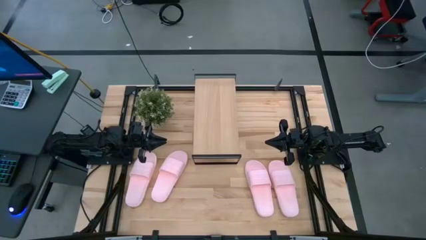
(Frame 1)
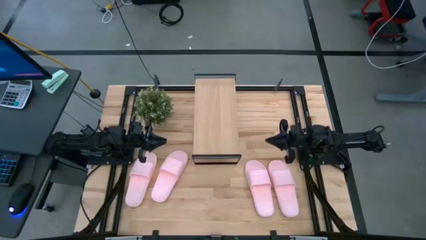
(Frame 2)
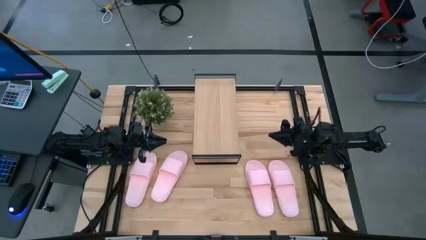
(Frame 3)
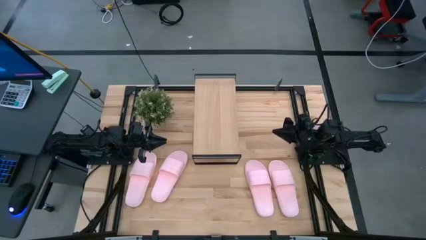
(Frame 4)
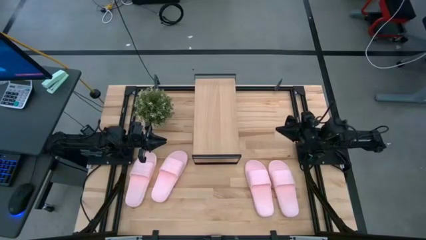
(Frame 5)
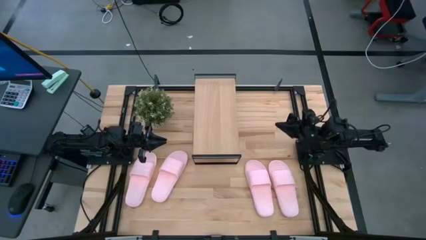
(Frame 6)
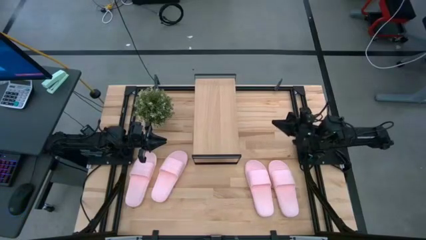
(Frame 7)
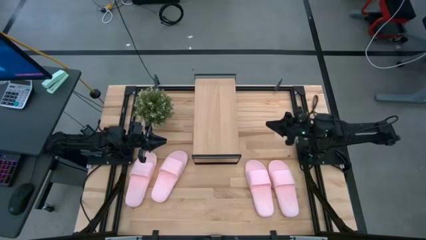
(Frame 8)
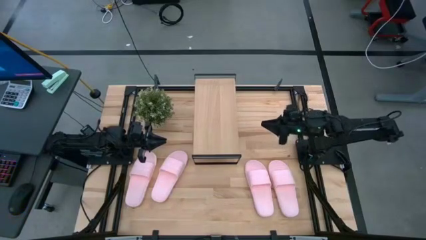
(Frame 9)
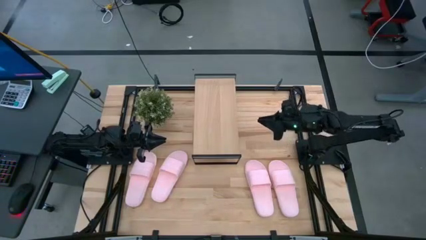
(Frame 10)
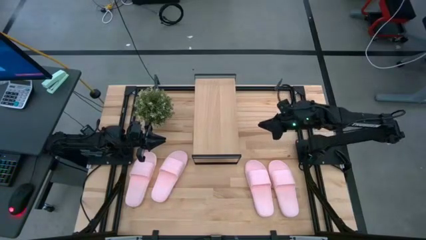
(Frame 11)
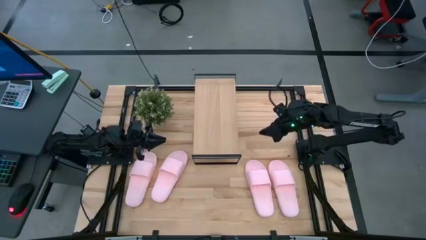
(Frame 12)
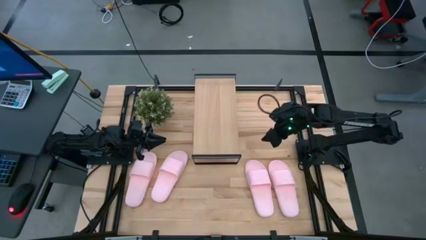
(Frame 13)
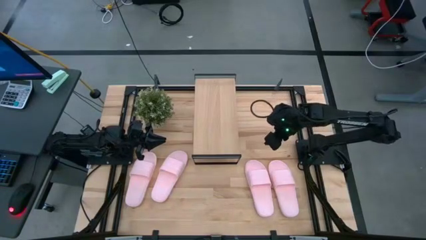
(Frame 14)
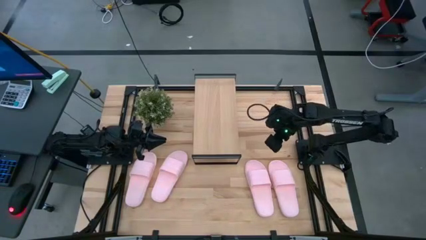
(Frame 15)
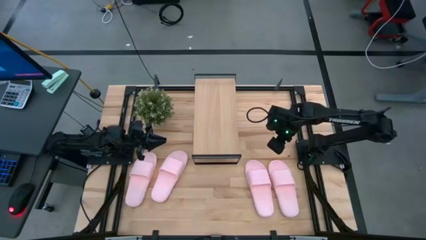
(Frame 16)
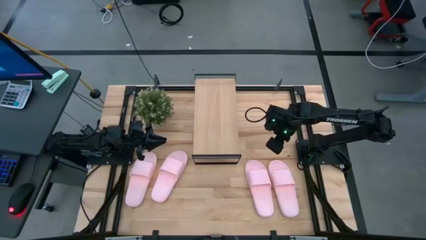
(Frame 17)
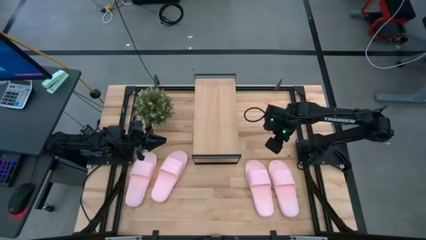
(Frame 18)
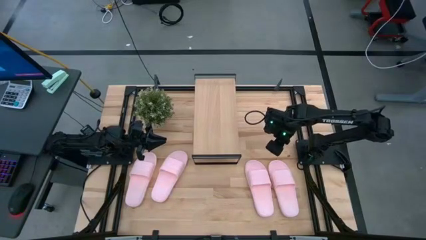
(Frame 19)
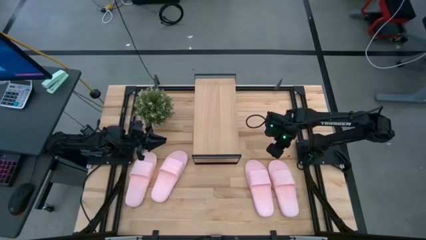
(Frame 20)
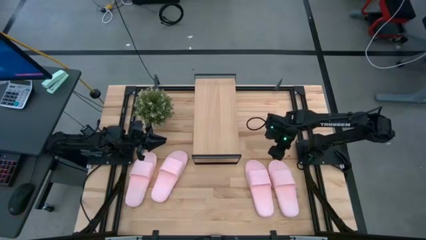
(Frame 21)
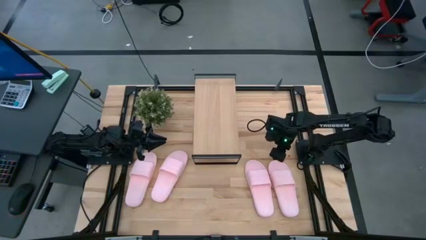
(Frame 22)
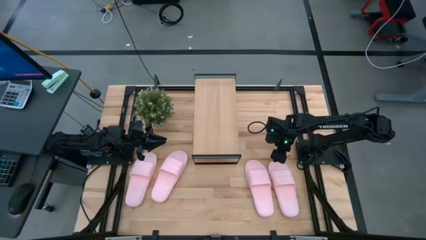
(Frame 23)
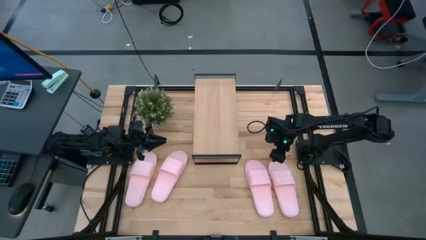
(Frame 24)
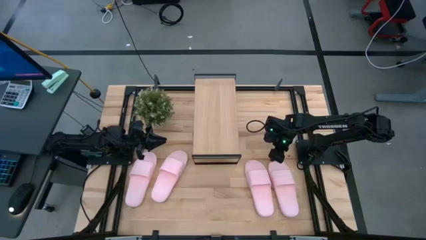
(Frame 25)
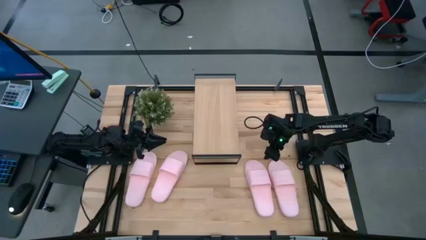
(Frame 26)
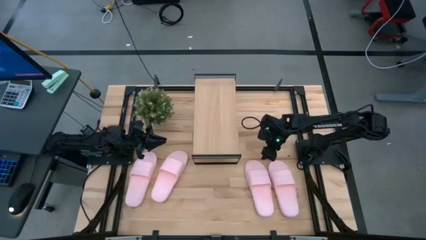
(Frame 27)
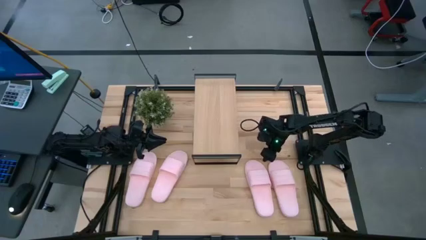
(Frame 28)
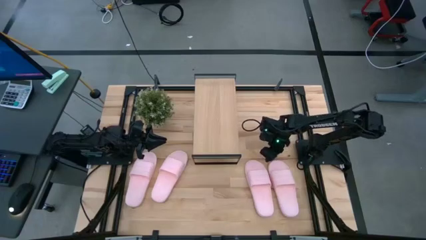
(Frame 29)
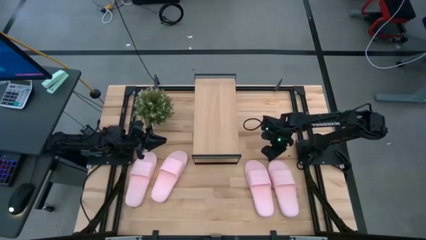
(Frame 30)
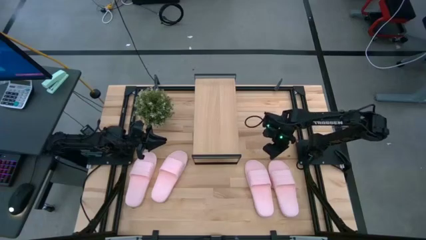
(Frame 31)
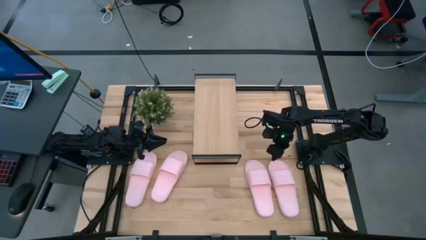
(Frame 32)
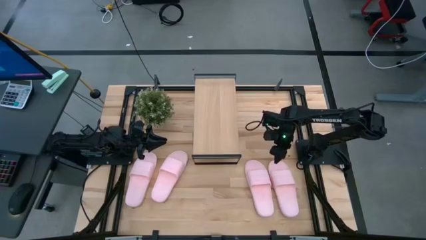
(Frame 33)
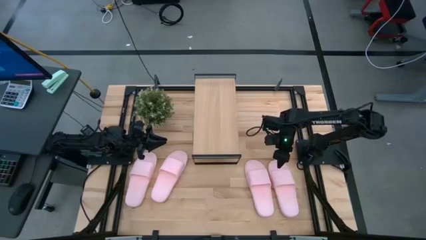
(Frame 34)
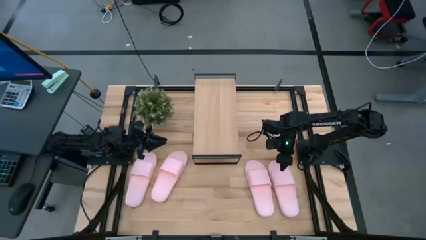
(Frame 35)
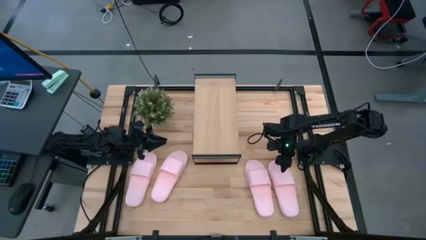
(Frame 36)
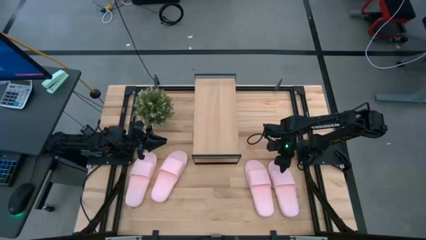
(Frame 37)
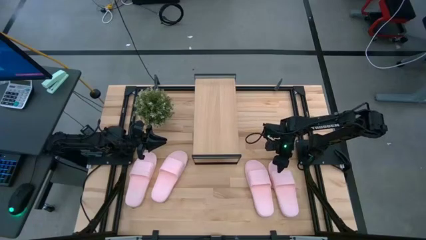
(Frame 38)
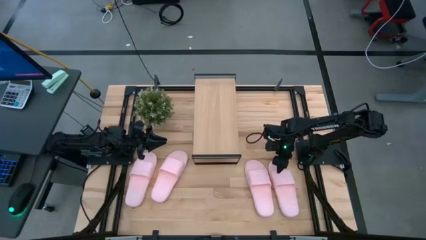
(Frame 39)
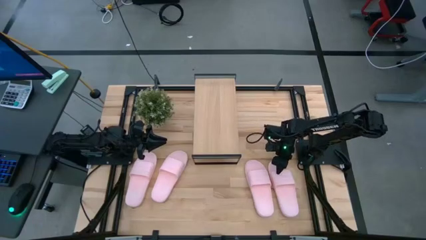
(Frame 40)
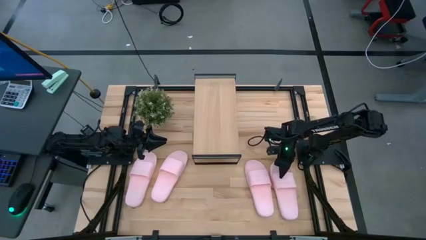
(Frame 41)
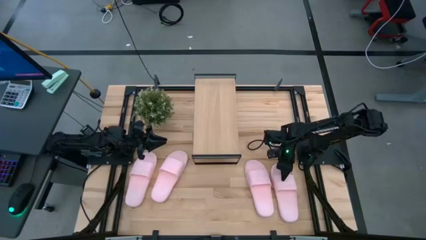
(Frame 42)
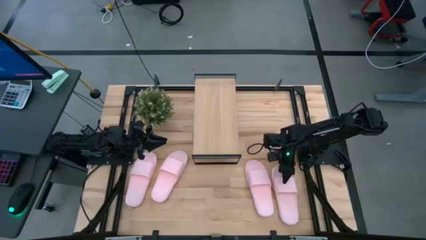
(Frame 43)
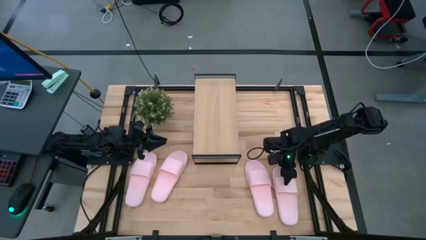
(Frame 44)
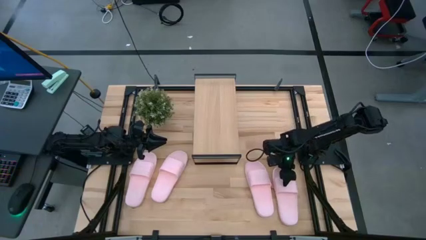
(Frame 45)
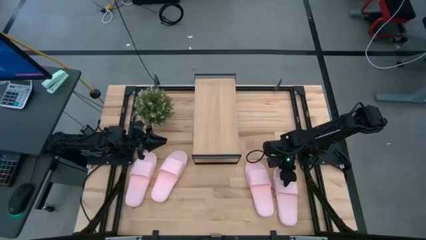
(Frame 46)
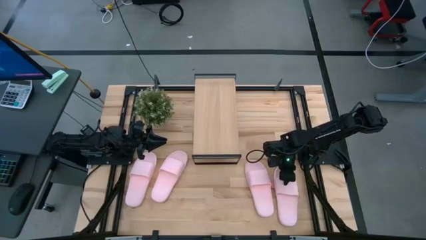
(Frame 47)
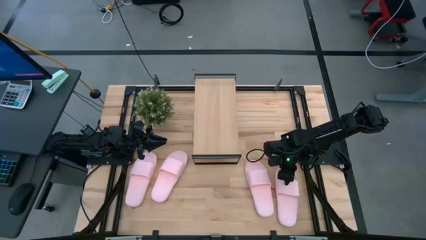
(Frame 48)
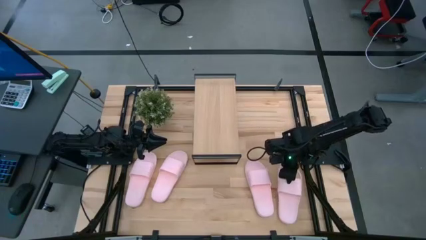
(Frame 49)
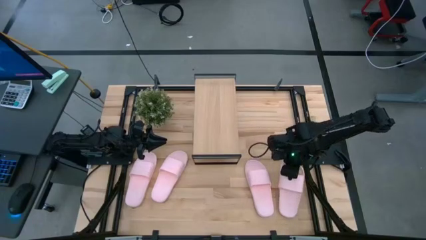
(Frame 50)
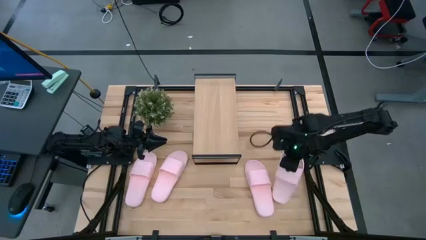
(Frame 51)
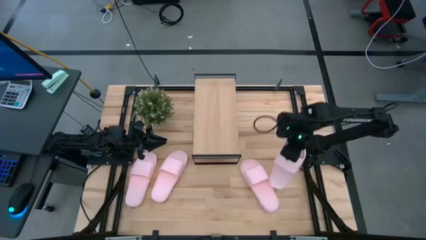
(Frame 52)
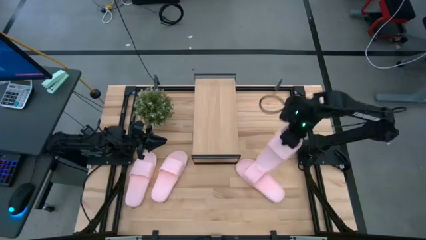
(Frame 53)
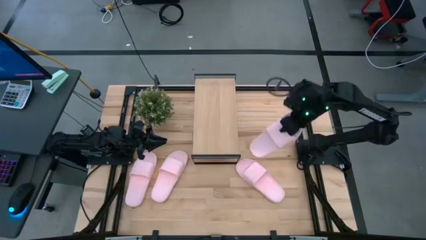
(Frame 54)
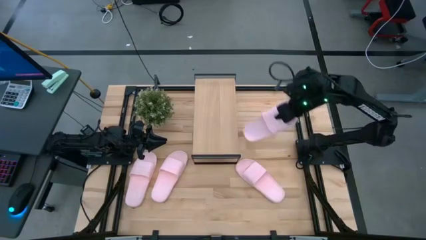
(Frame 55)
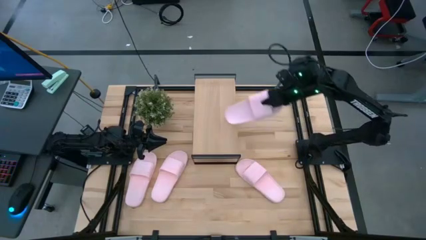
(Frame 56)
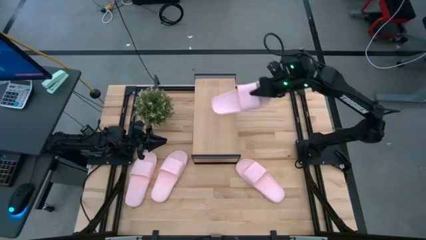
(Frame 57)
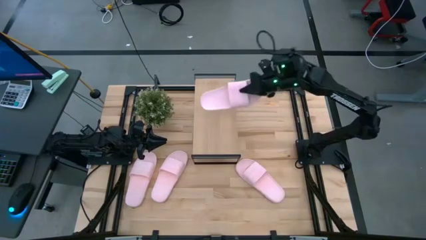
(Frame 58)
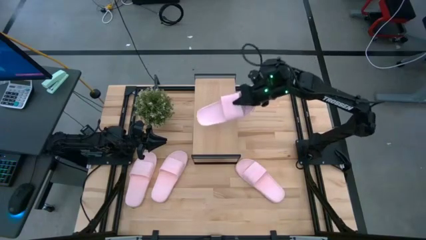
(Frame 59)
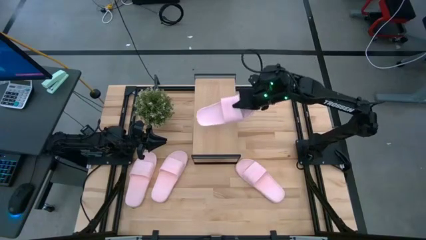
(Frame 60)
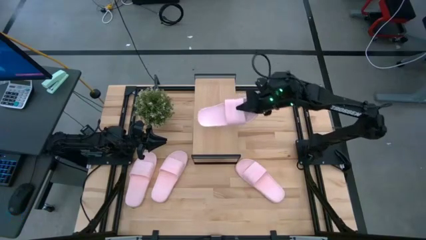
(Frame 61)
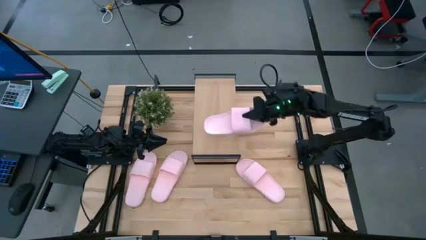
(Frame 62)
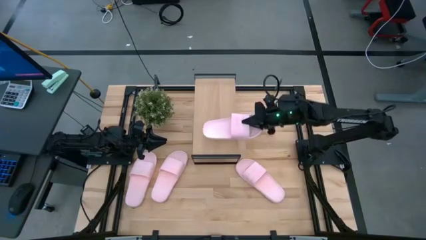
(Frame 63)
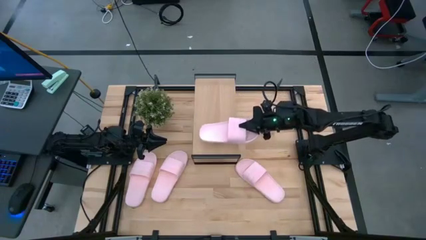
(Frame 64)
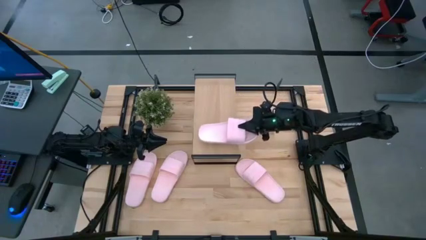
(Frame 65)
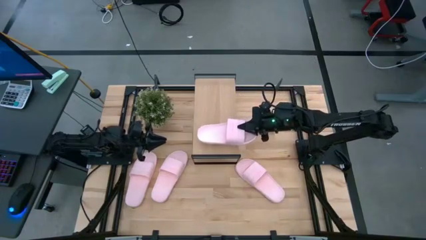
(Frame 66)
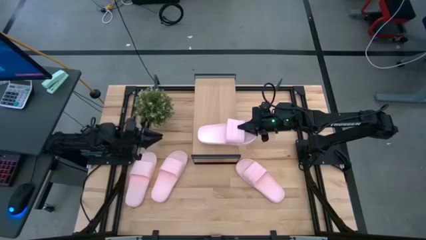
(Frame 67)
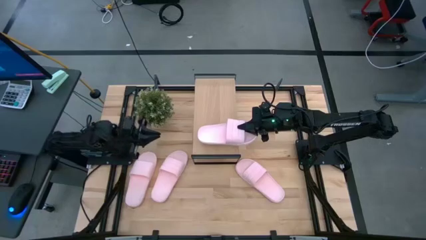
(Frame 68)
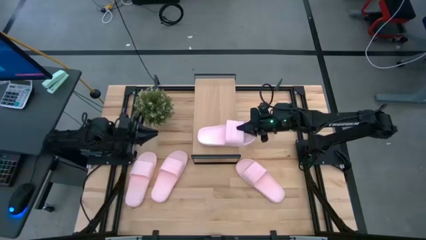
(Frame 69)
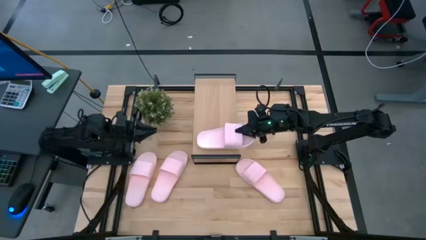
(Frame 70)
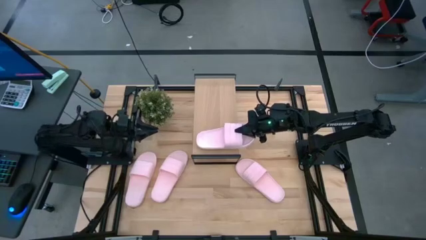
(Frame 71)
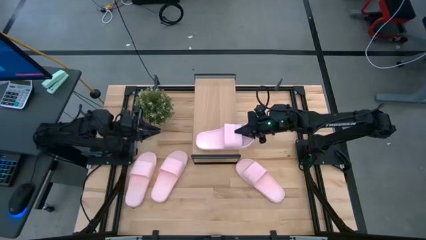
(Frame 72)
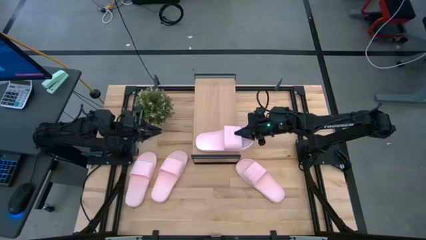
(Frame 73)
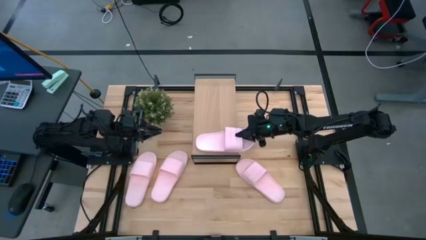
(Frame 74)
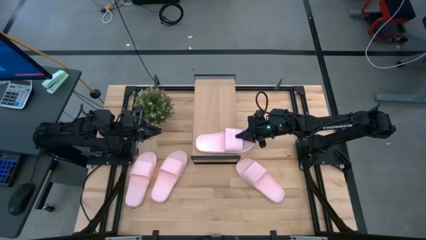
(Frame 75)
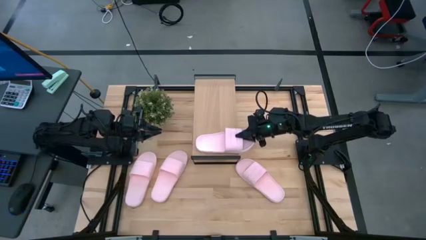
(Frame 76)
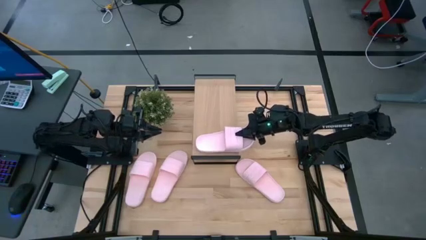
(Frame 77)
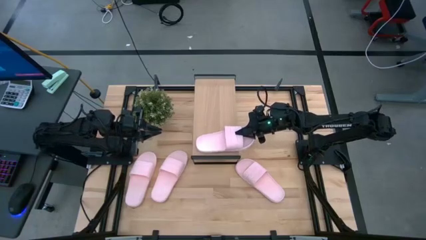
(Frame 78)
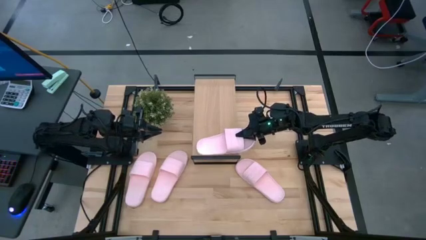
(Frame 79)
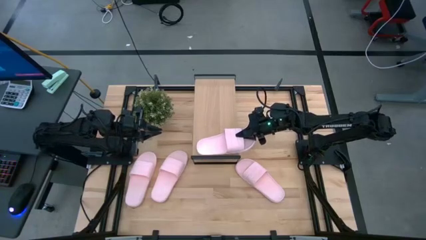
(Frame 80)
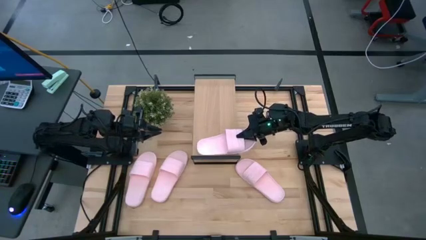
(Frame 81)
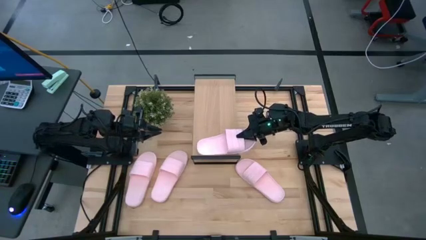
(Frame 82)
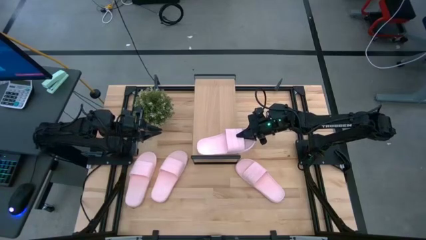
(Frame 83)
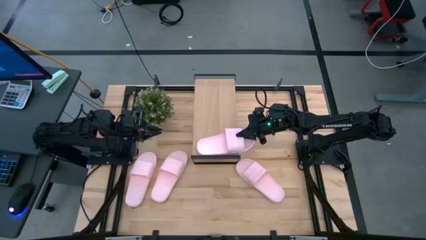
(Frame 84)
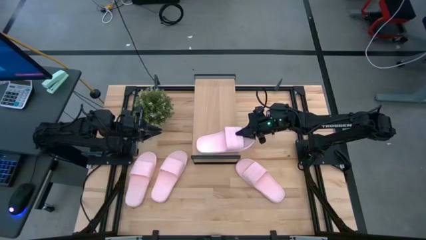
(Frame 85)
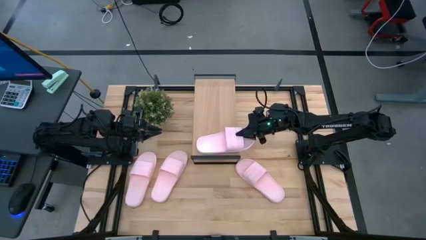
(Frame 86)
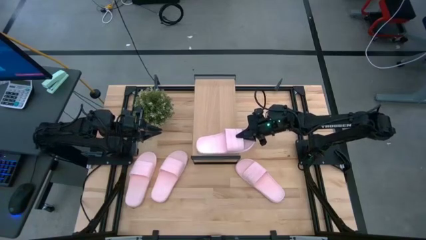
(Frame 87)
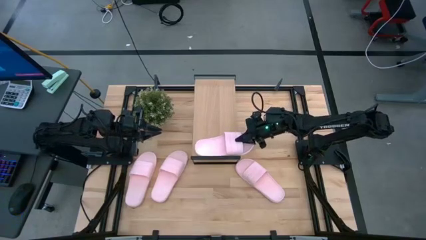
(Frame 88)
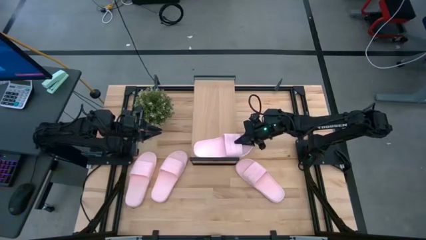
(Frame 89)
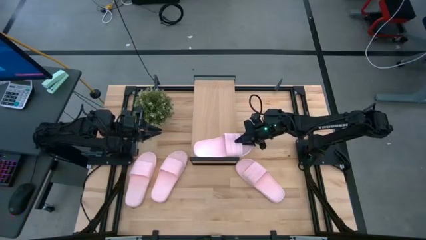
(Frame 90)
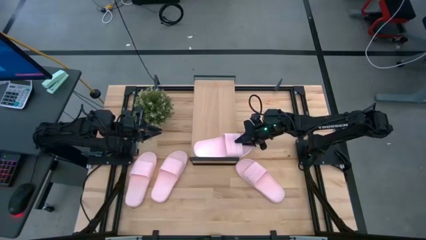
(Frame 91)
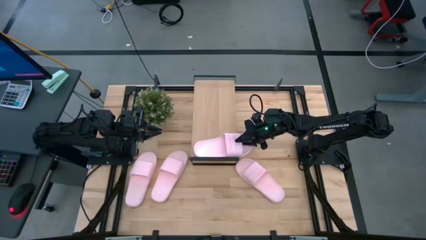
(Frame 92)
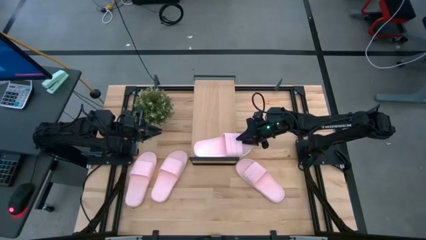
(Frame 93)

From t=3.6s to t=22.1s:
Task: Pick and place slides into the shelf
Put the pink slide on the shelf
